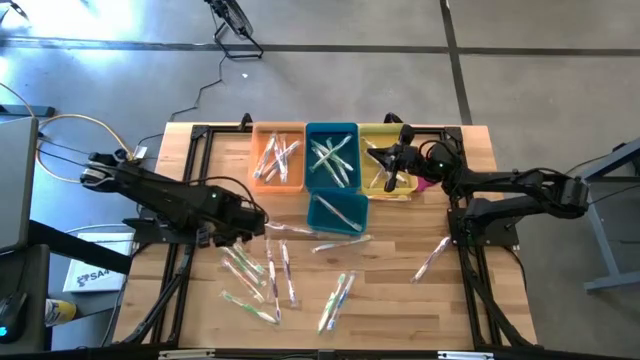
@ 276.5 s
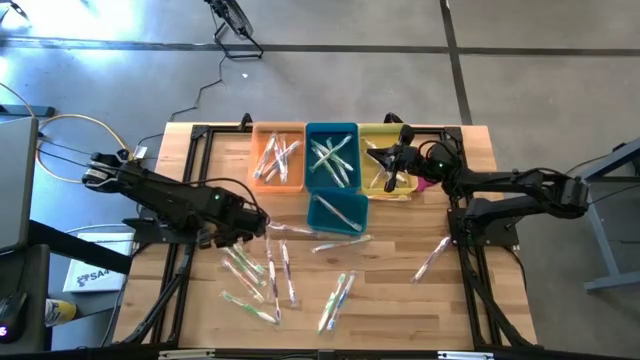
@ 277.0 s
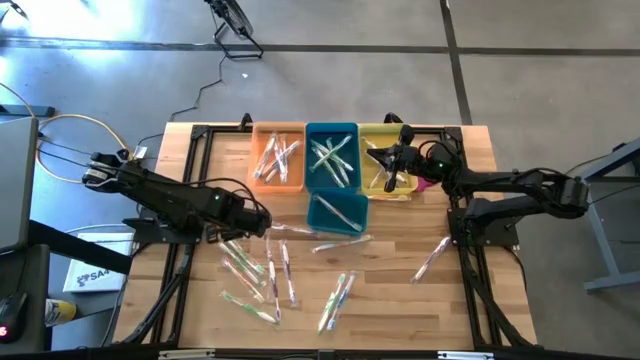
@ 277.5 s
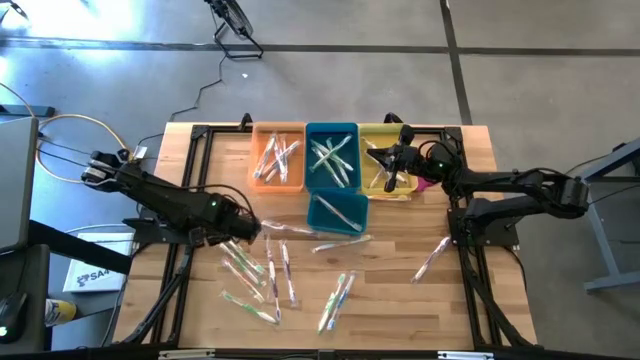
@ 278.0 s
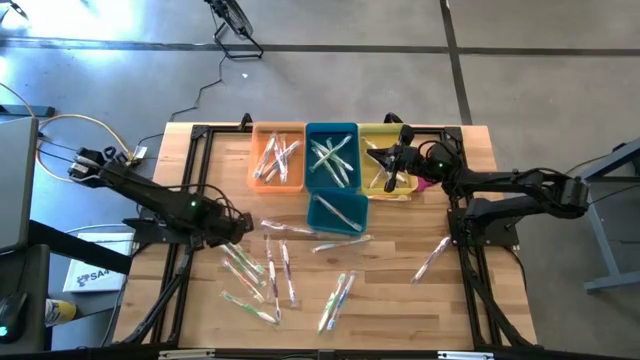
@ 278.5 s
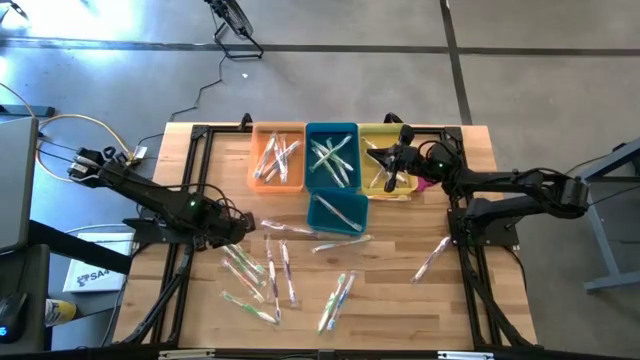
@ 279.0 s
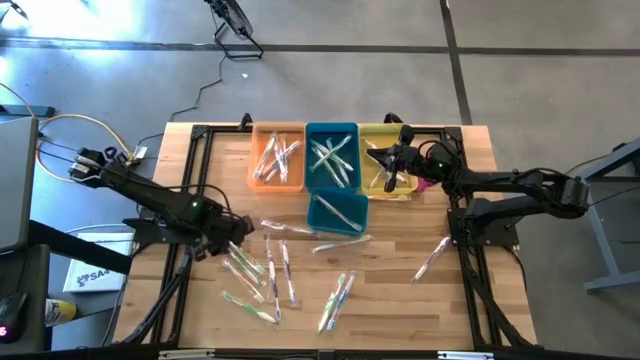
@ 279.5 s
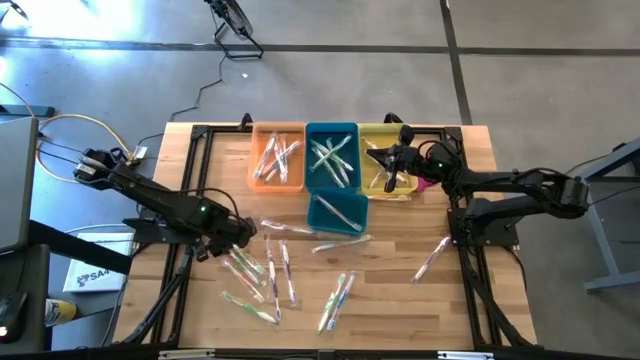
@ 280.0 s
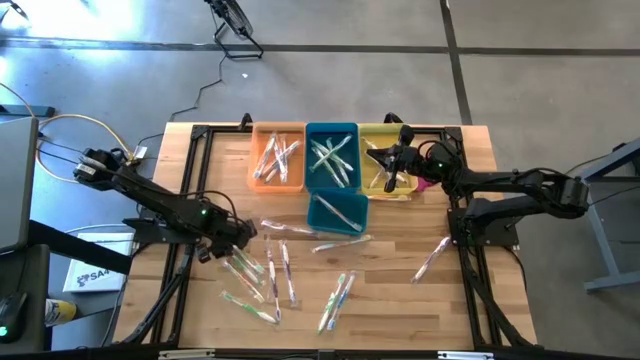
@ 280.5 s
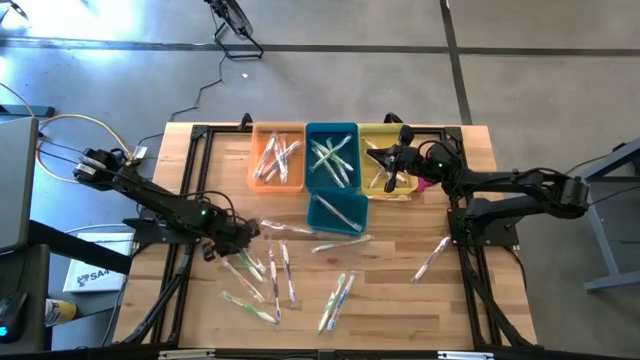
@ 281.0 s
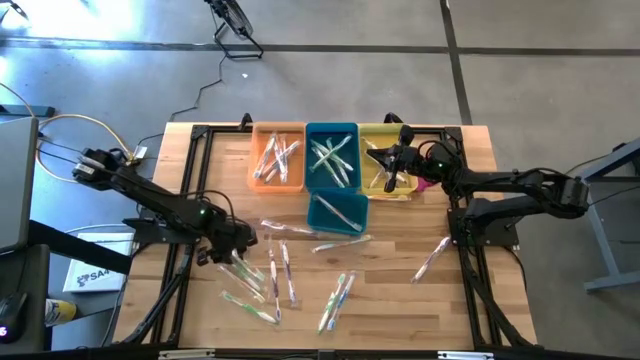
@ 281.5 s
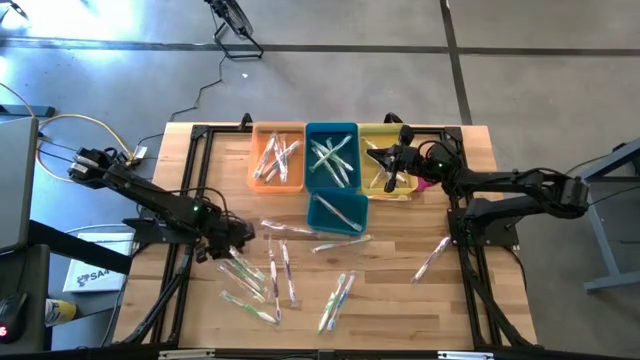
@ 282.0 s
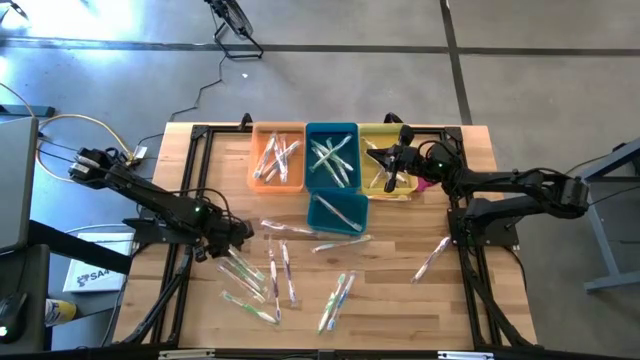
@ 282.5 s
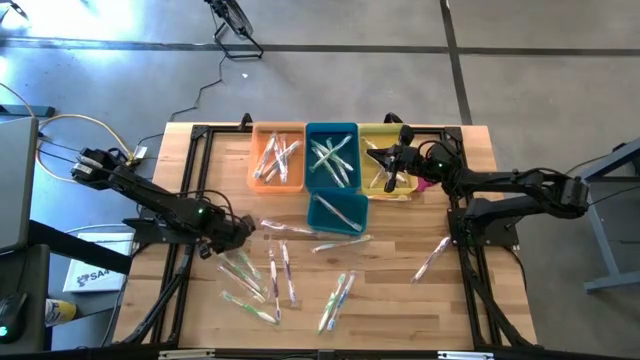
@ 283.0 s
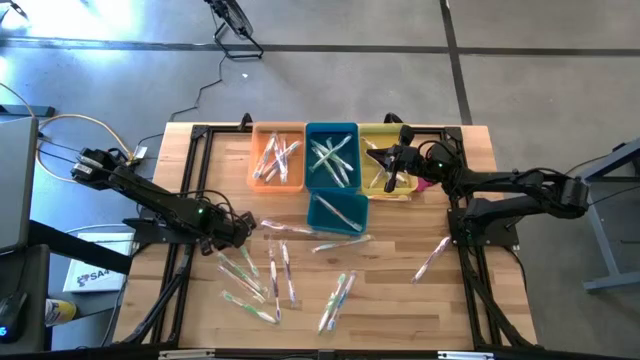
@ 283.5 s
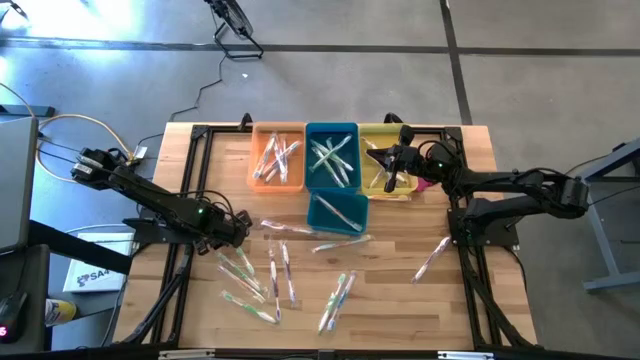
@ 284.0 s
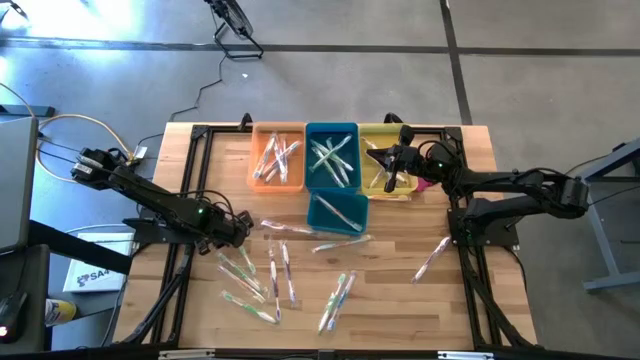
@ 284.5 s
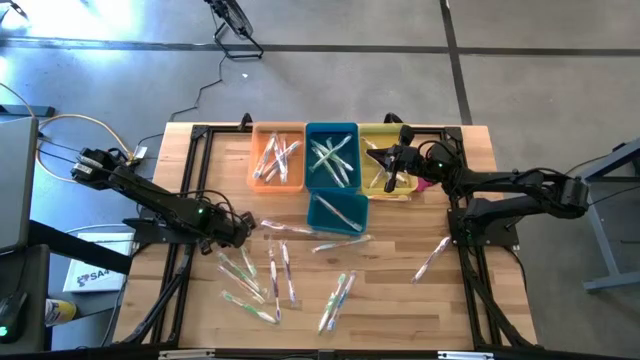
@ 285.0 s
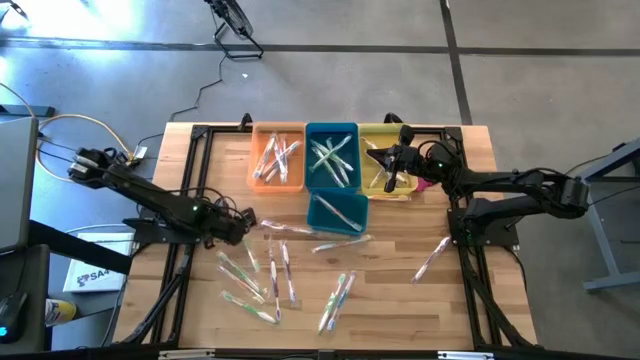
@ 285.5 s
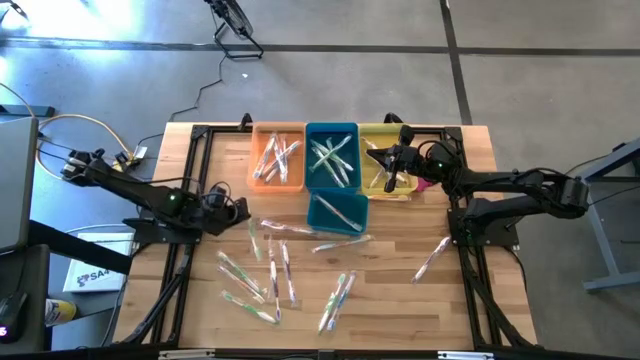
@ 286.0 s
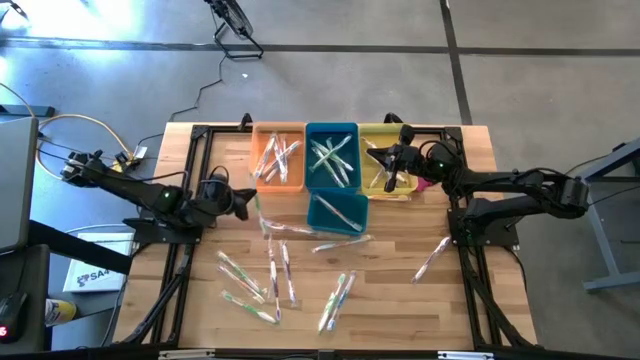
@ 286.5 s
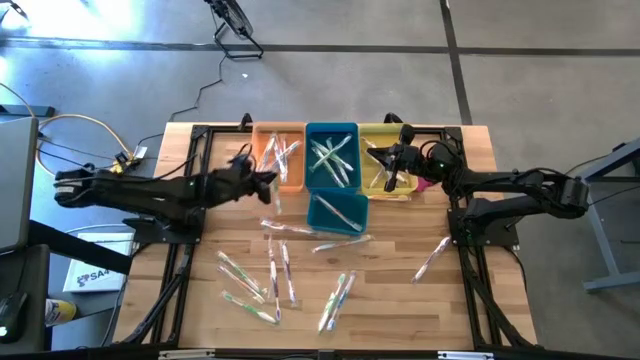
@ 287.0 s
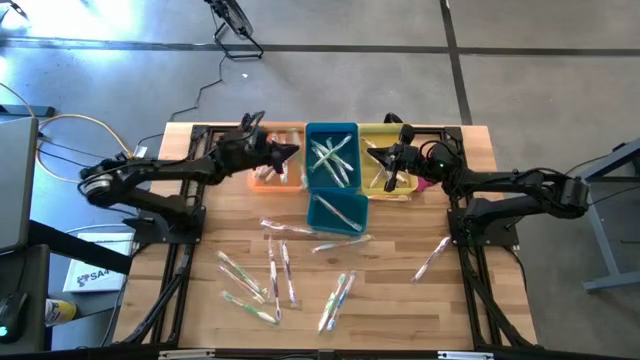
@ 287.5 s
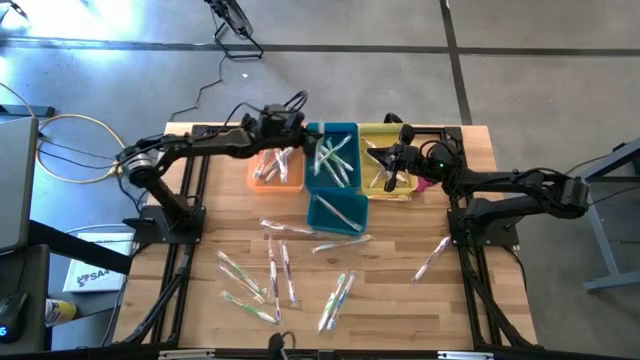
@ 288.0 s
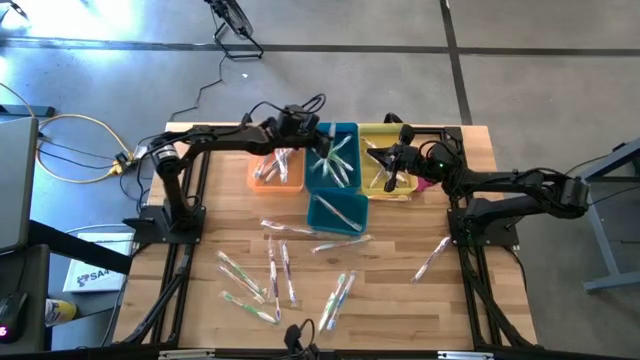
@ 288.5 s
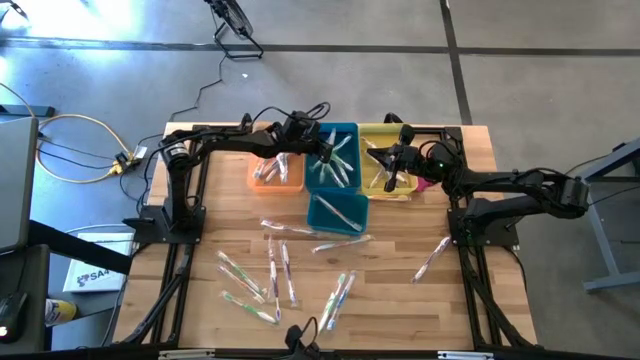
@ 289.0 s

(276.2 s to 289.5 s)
Task: Pick & Place Toothbrushes
Put the green toothbrush into the top blue bin

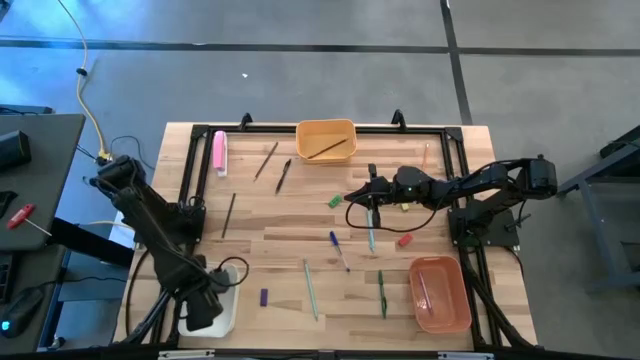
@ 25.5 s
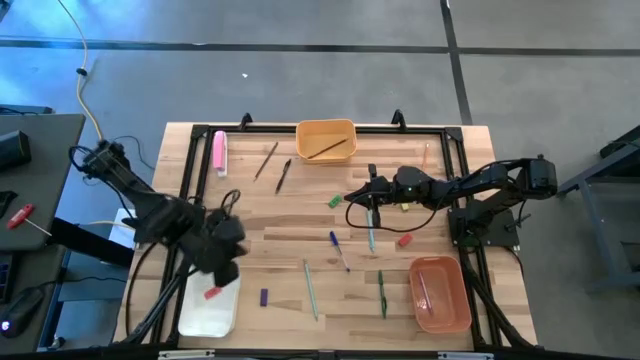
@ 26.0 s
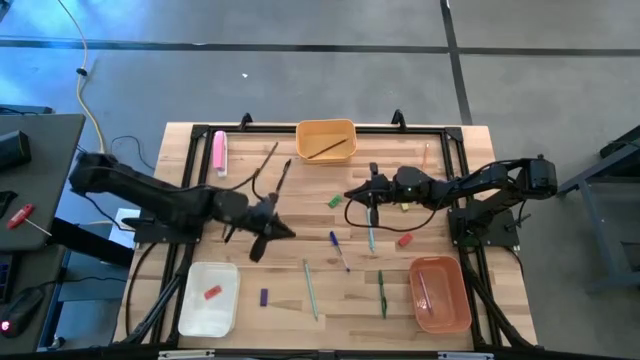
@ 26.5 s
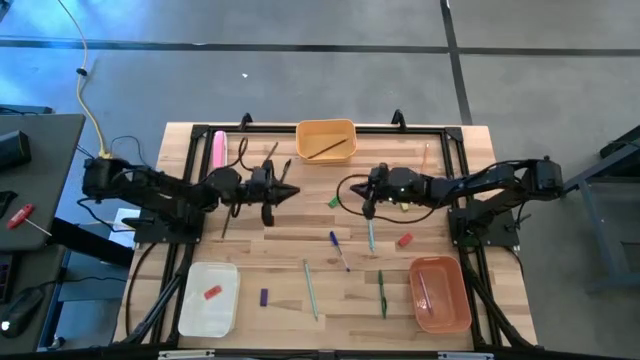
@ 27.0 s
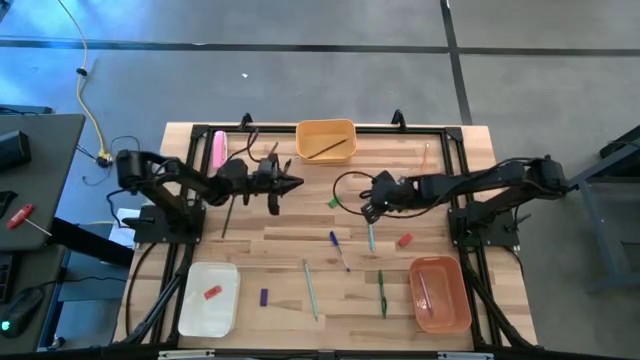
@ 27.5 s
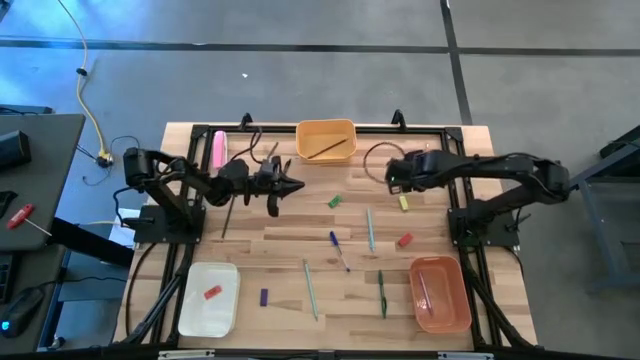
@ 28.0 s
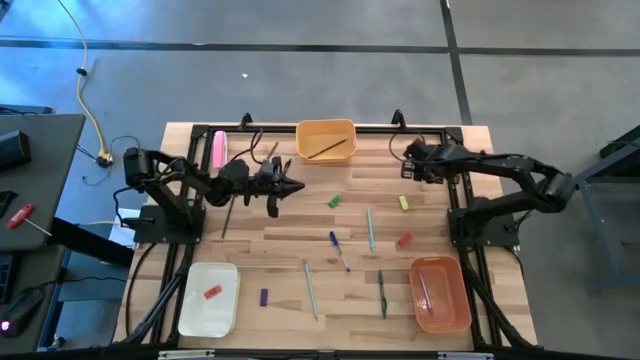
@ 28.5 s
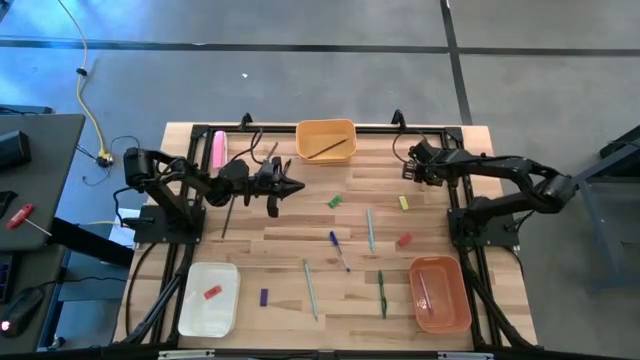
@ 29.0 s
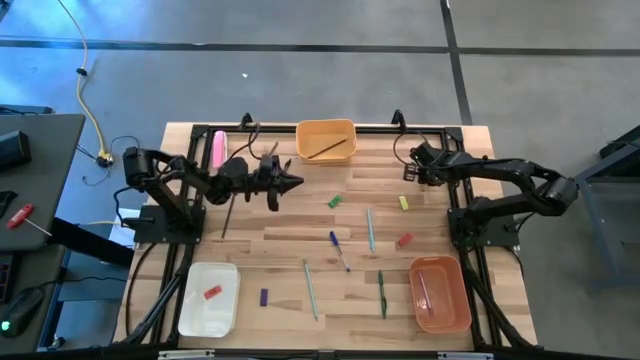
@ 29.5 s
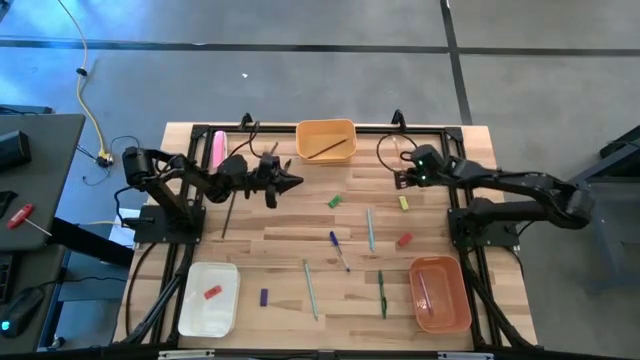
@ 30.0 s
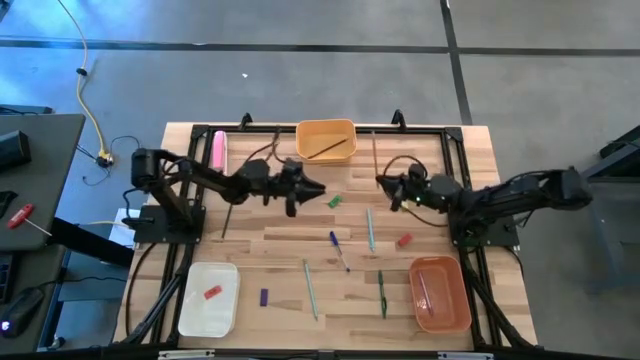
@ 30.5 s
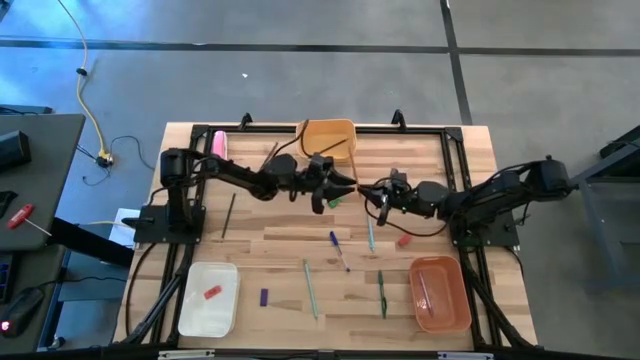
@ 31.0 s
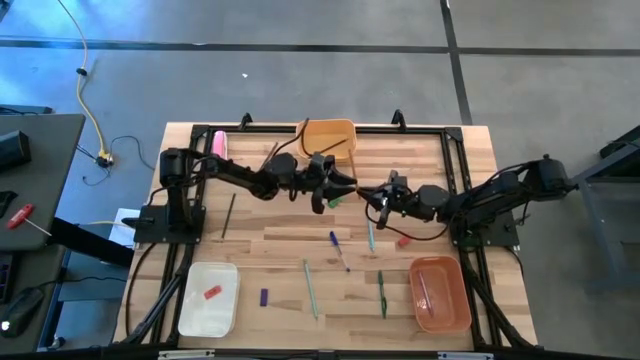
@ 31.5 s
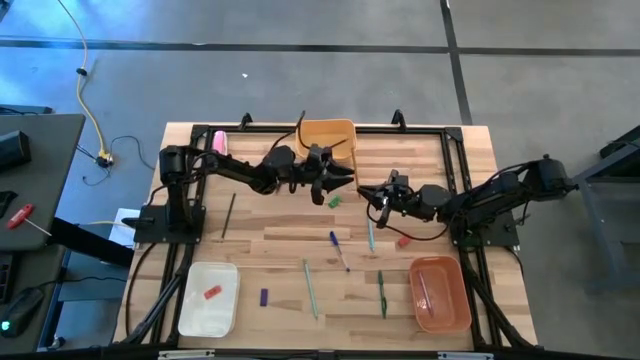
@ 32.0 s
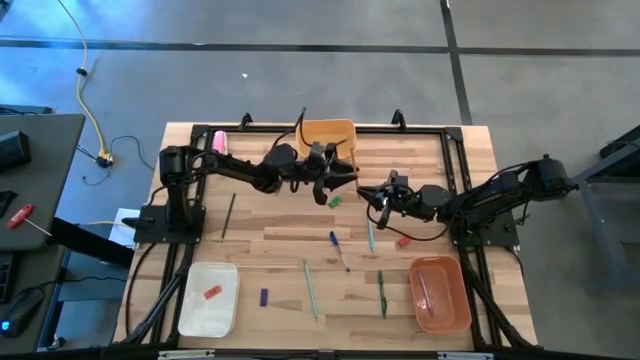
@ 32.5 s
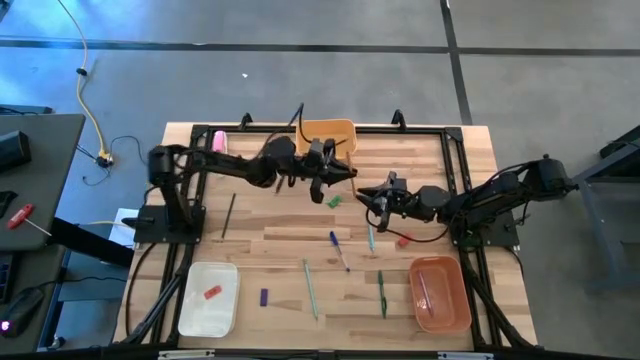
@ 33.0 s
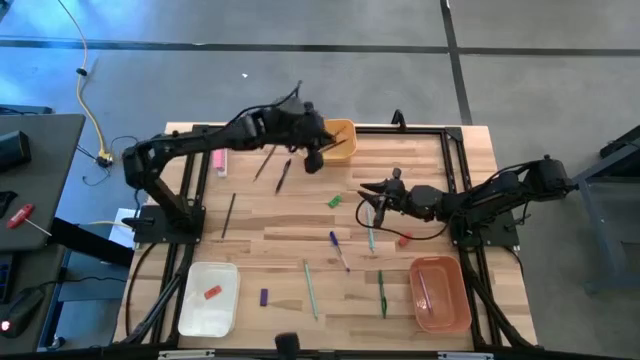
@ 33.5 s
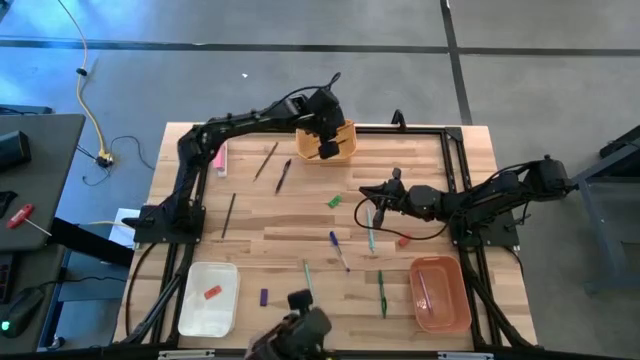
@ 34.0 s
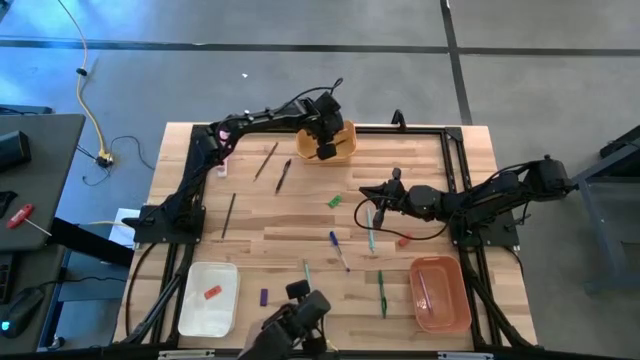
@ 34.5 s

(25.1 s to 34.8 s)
Task: Sort crayons/erasers/pens/pencils in bins
Put the yellow pencil into the yellow bin
